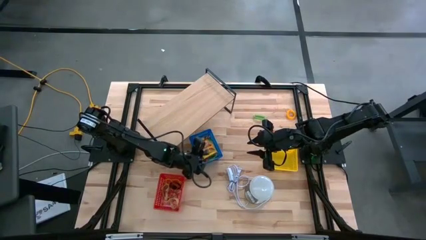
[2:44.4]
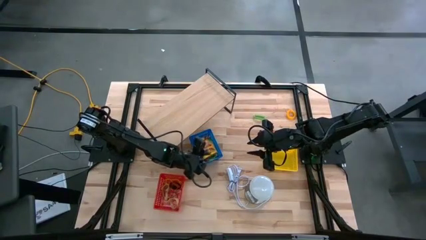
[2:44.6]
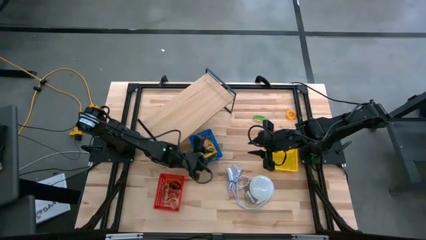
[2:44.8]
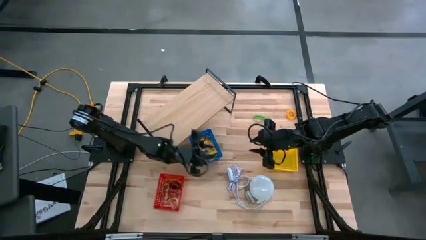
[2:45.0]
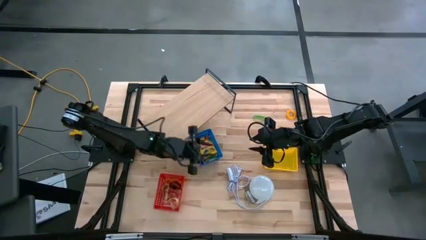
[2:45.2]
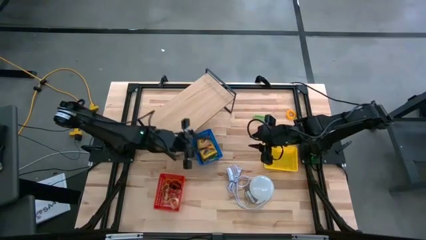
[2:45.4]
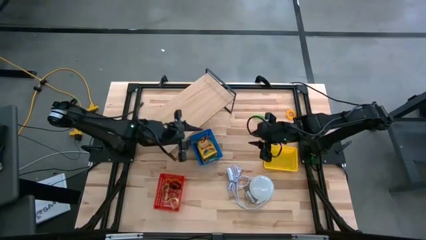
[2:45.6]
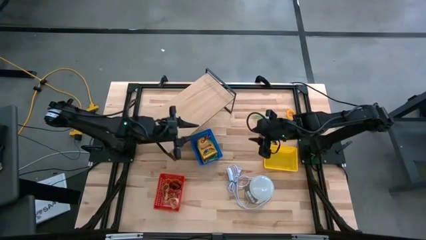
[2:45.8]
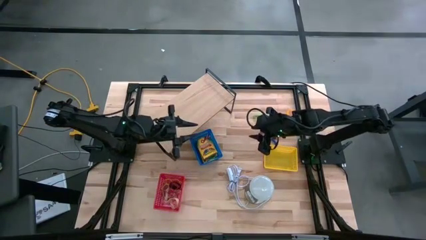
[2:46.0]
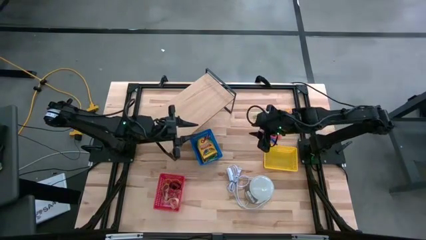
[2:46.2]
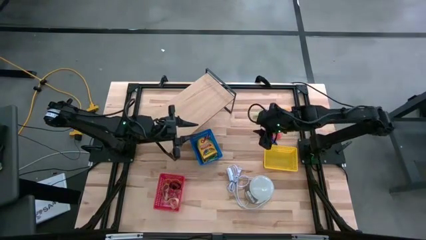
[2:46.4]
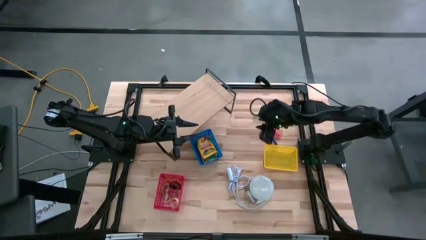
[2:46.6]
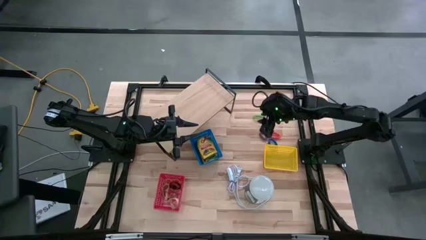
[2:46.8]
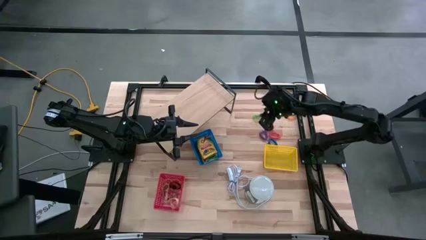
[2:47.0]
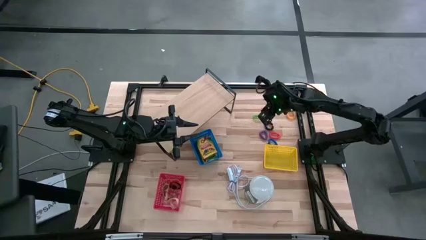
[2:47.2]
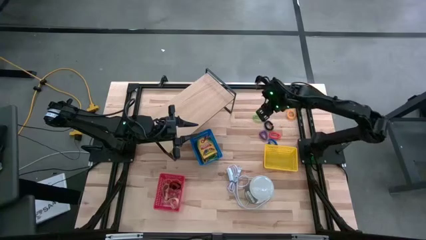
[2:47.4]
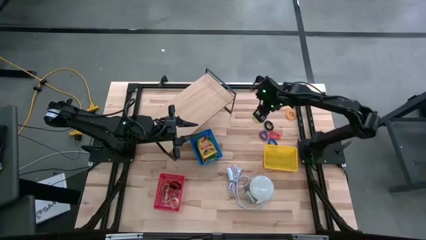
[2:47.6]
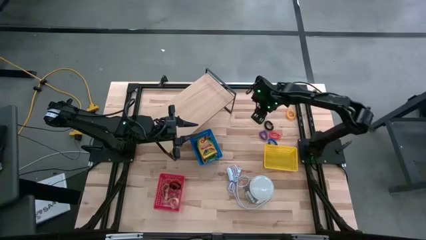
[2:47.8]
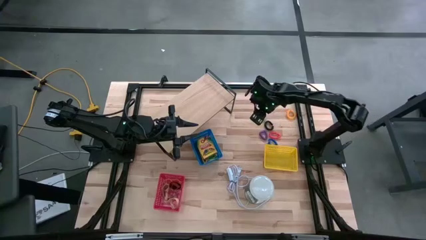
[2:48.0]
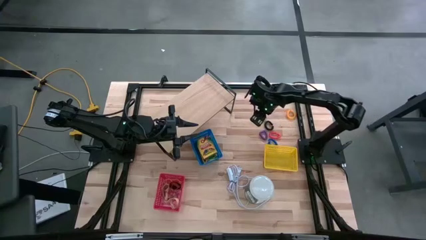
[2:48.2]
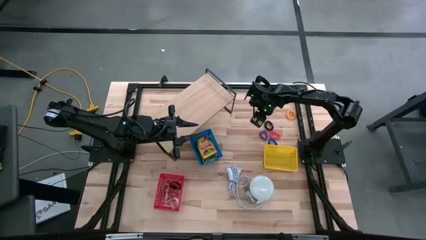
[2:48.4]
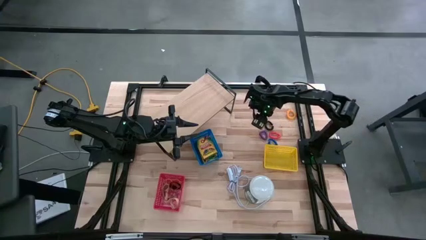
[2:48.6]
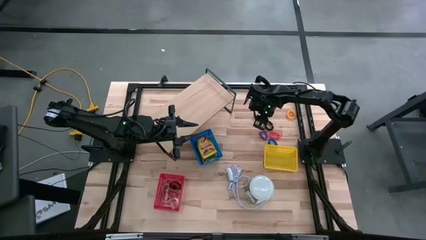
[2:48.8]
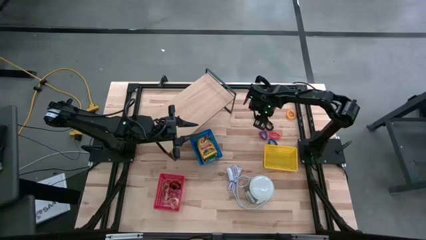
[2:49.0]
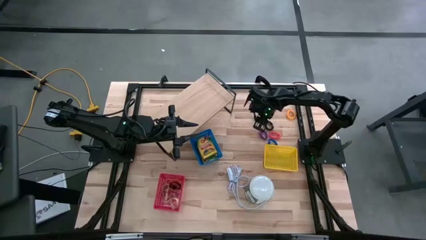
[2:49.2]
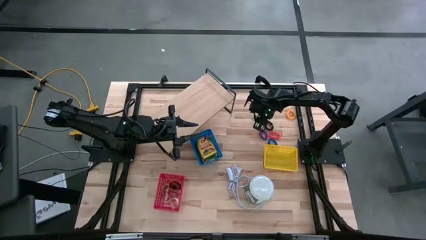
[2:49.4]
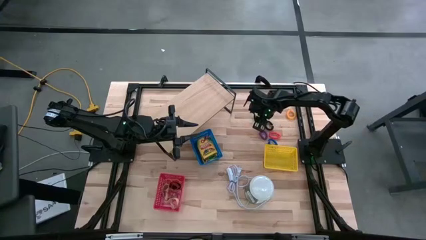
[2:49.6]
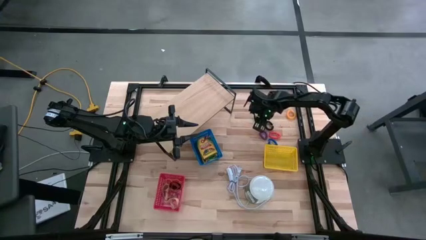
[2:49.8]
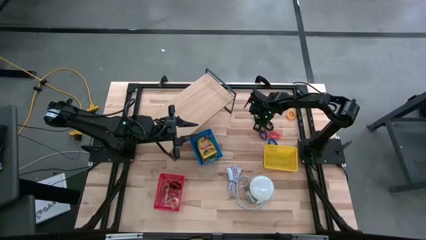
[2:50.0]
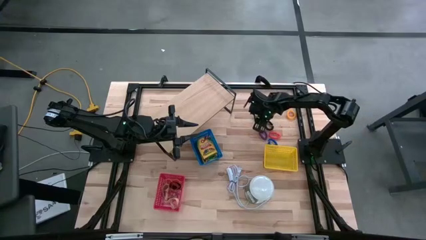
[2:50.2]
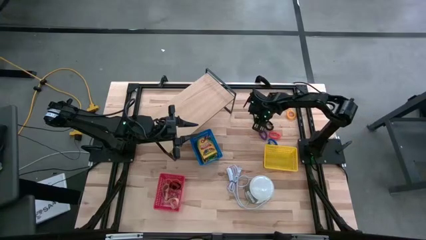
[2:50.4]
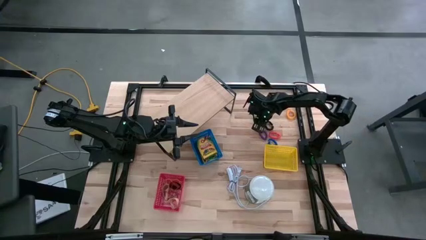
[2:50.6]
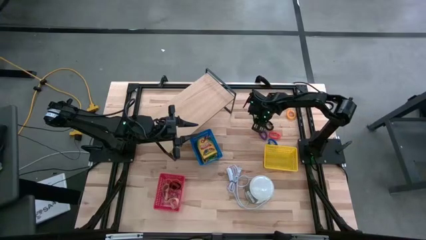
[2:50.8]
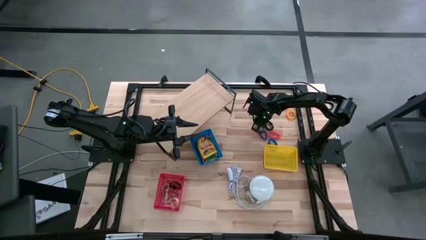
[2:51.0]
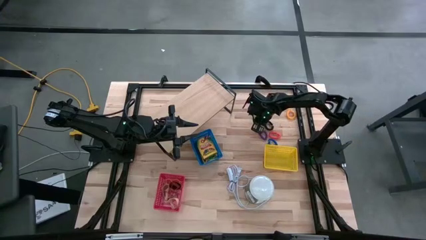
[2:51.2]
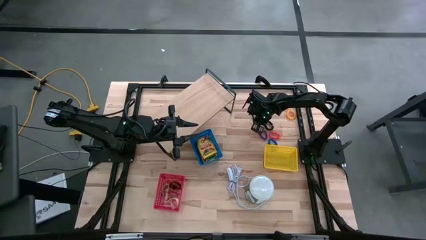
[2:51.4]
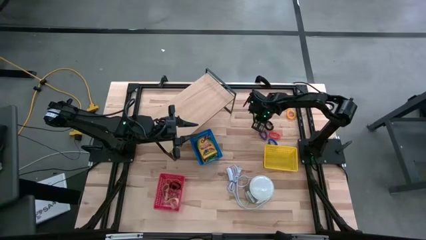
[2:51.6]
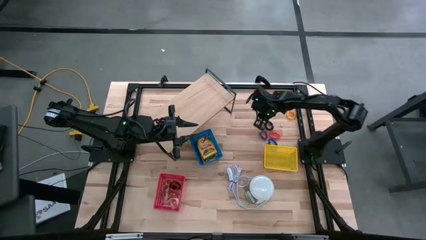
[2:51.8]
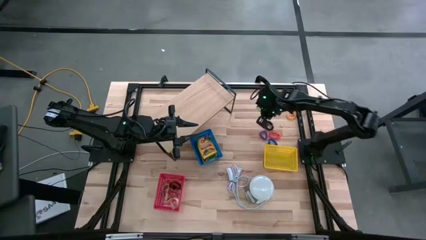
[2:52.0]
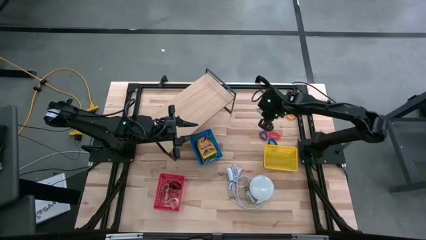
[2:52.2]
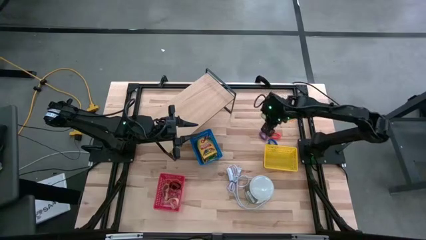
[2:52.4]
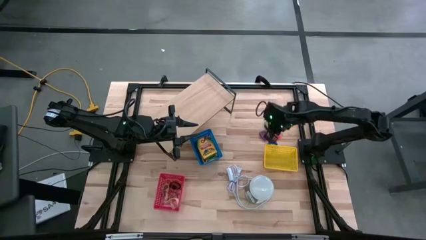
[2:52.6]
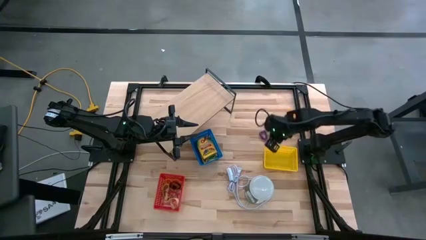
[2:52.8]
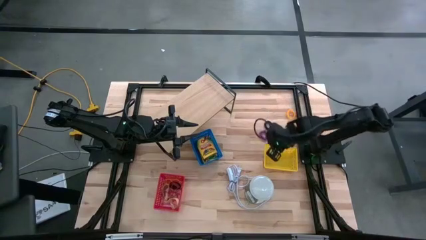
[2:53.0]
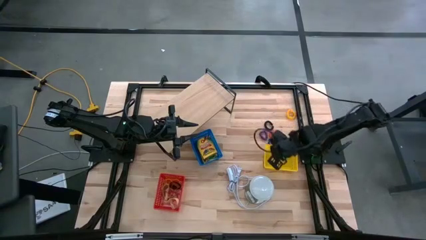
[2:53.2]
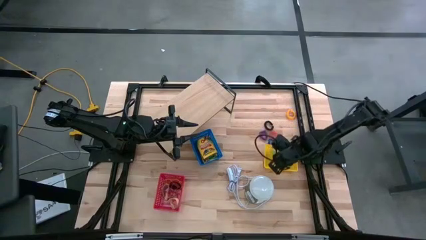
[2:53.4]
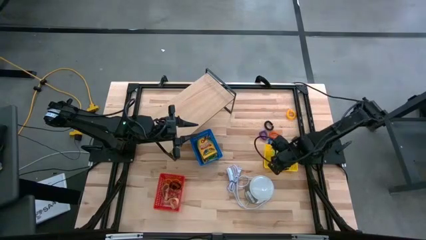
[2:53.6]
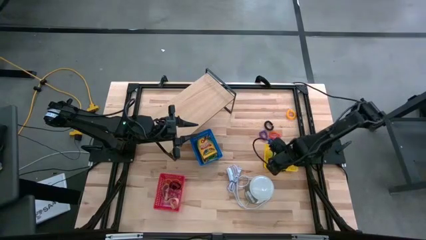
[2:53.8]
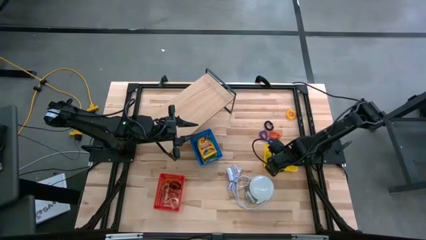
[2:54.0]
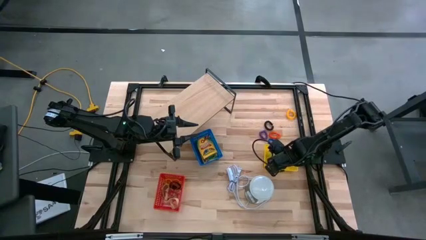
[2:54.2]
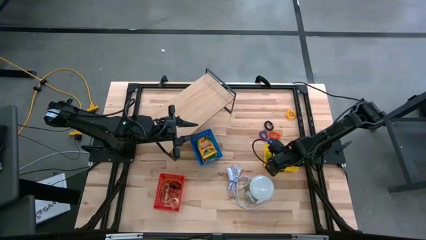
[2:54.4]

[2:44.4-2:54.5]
Task: Pick & Place Office Desk Supplies
Put the green spring keychain into the yellow bin

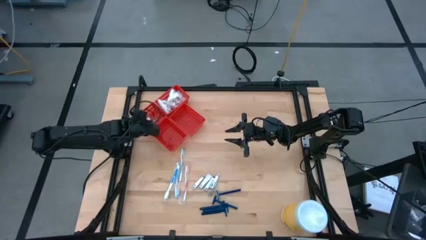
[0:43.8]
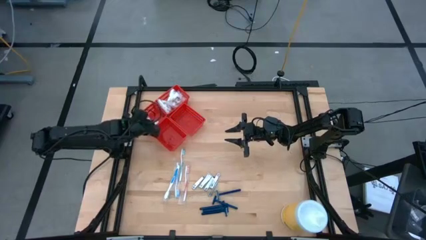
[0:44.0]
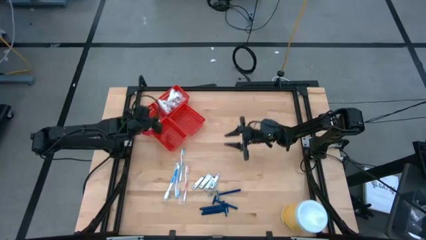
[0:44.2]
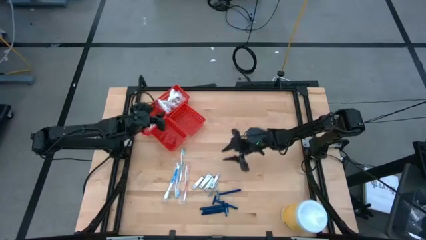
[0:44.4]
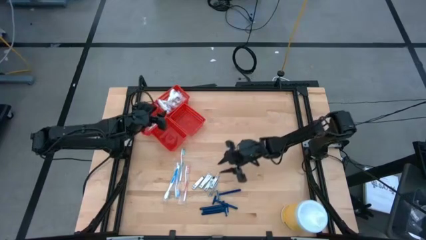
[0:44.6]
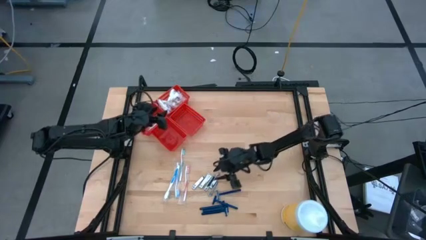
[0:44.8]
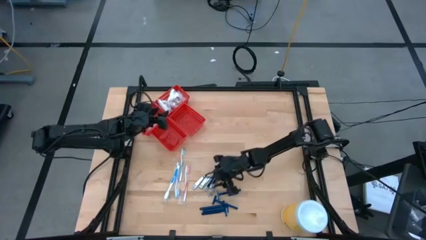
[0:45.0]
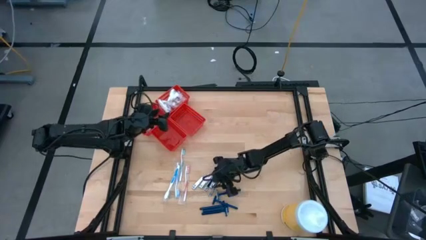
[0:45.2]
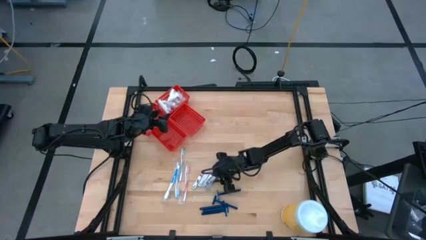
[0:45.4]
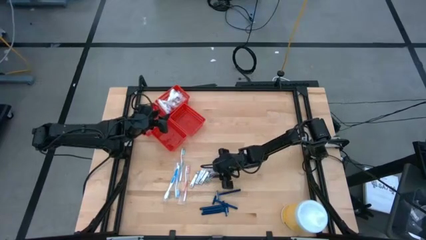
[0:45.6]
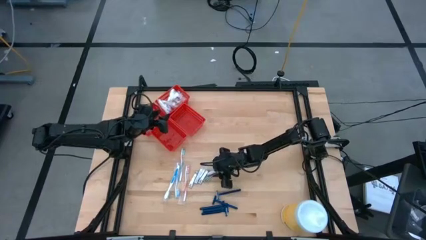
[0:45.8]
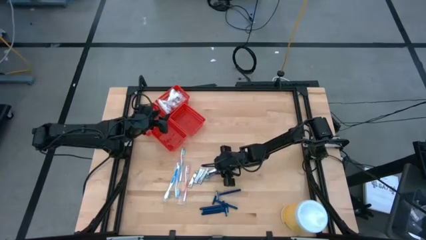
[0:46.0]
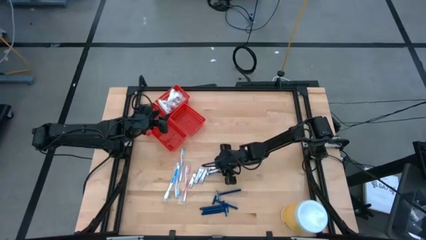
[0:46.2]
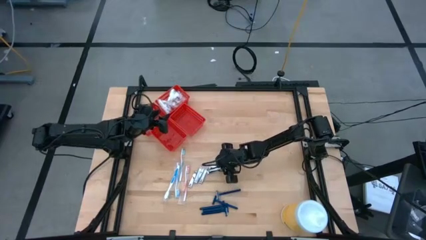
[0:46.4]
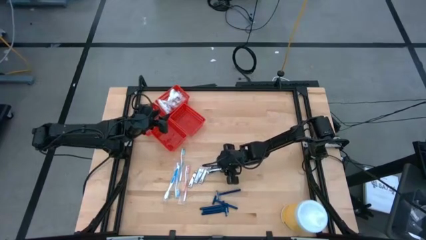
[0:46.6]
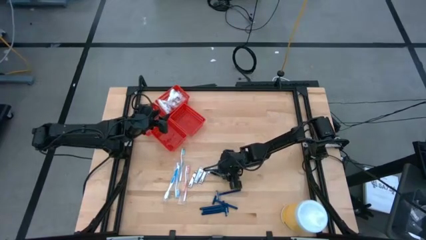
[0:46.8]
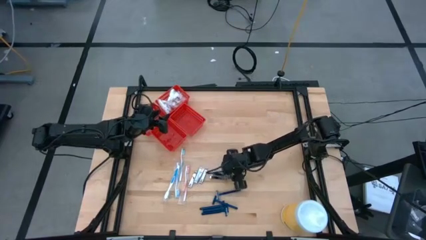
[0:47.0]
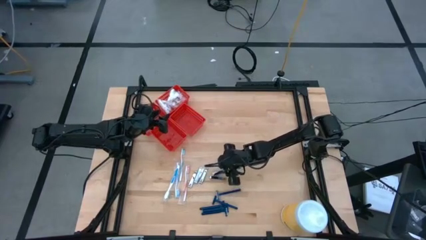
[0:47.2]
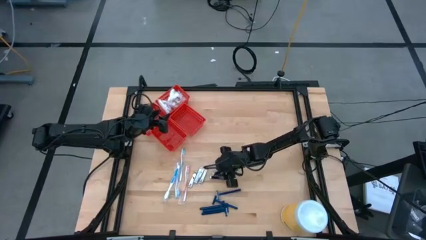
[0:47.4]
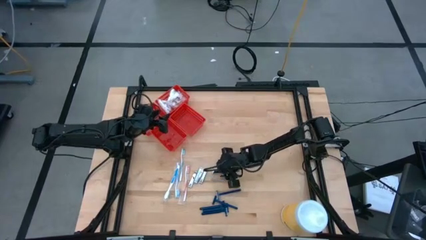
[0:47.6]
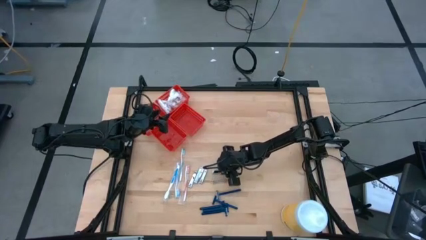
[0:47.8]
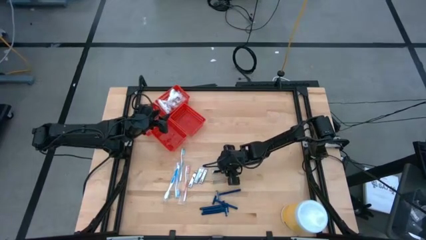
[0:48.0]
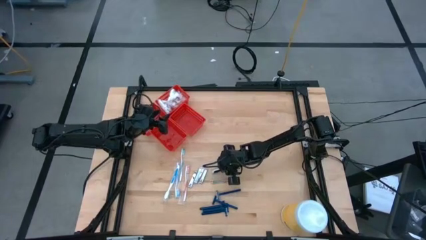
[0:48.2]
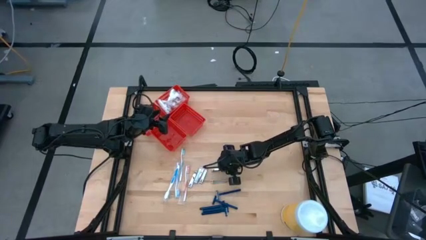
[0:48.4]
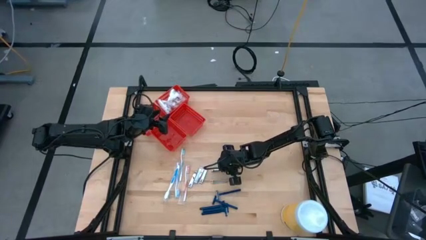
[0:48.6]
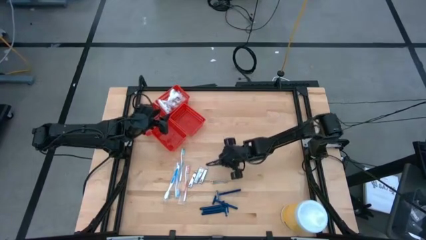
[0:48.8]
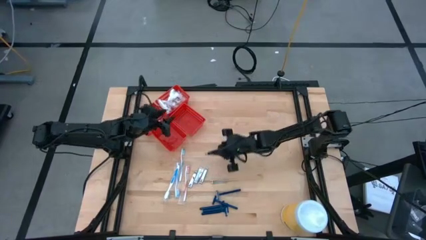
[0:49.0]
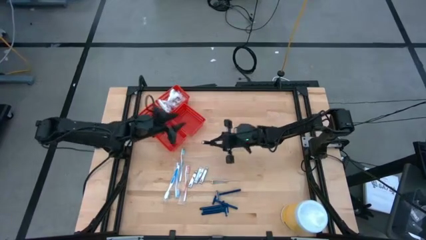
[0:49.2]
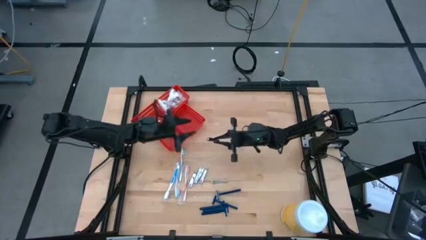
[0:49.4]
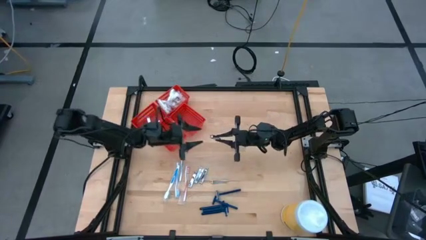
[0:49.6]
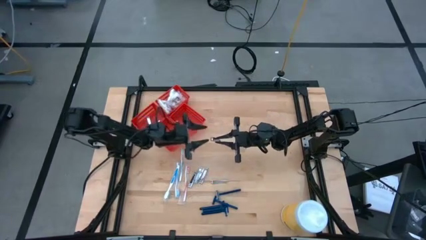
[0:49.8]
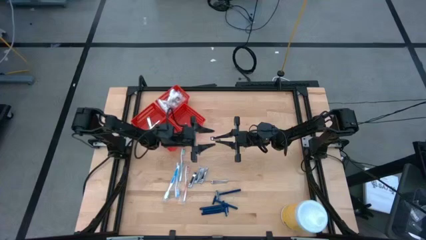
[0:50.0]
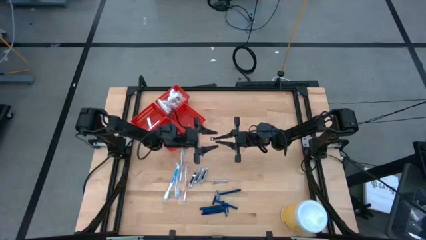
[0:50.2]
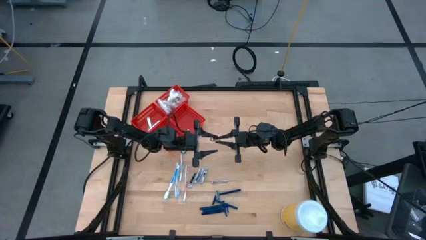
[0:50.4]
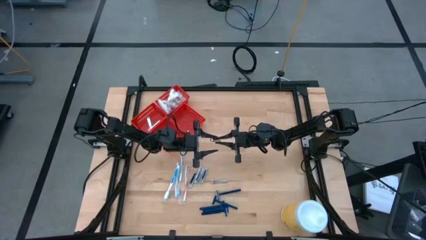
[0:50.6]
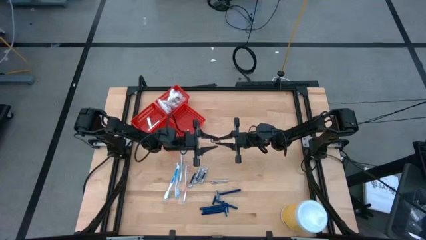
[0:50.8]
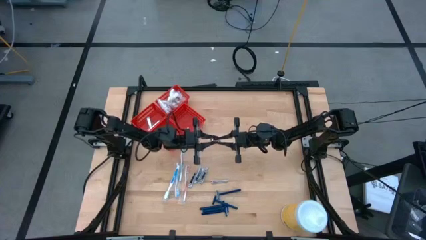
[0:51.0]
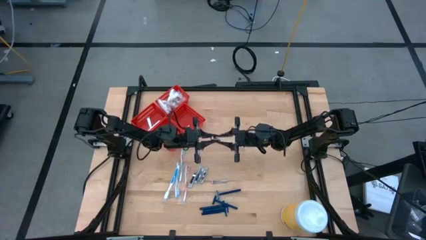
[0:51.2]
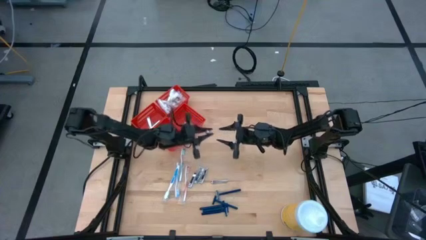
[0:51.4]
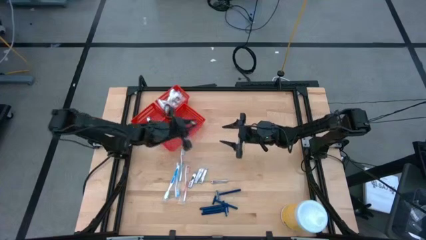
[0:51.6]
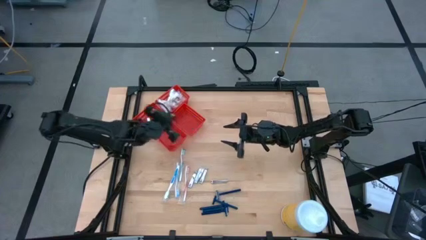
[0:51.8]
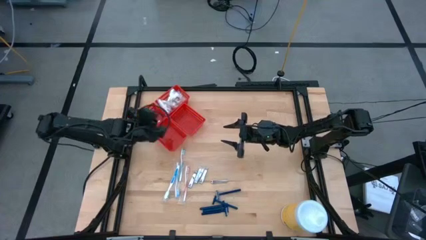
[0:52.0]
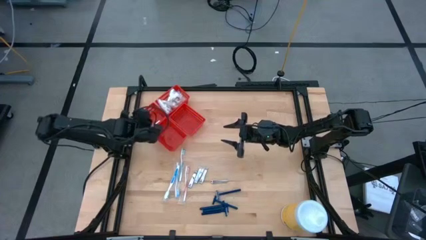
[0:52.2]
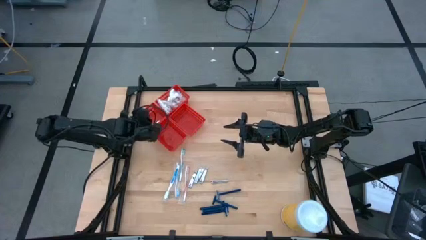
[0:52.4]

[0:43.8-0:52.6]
Task: Pick & Place Travel size toiletries
Put the nail cutter into the horizontal left red bin
